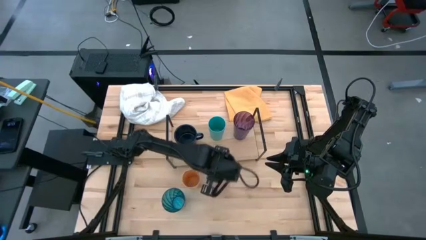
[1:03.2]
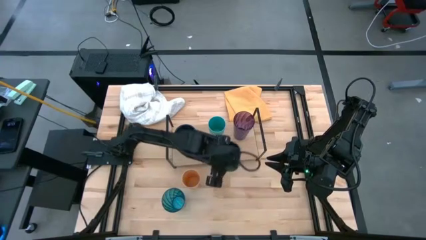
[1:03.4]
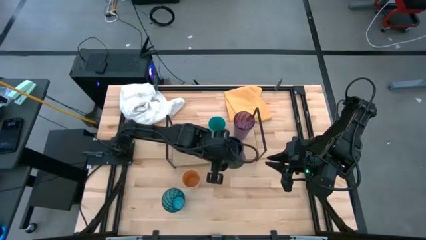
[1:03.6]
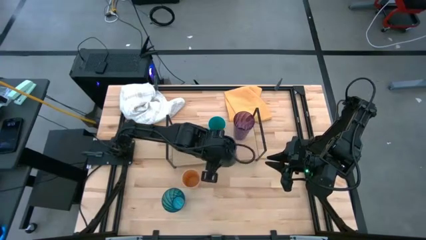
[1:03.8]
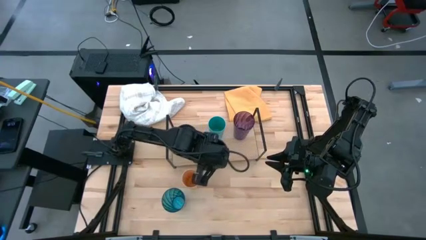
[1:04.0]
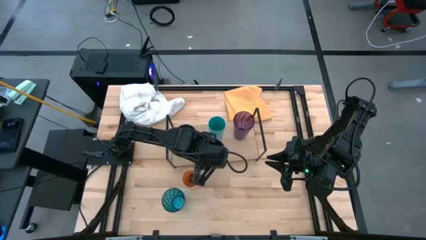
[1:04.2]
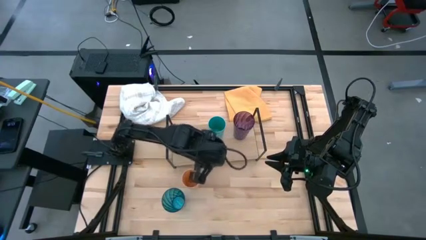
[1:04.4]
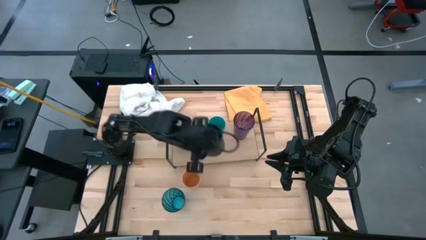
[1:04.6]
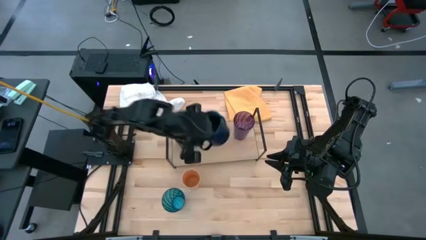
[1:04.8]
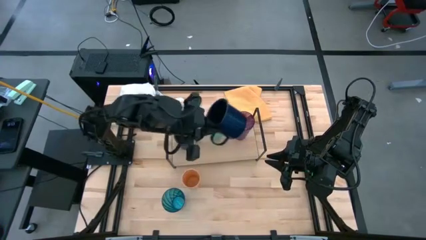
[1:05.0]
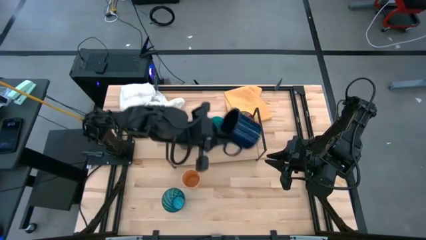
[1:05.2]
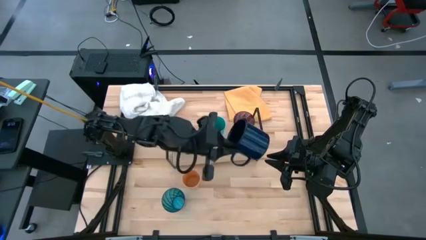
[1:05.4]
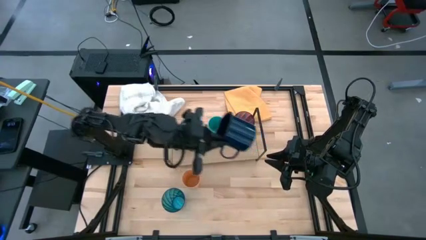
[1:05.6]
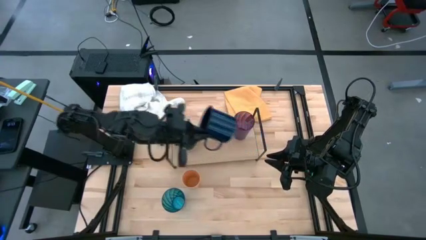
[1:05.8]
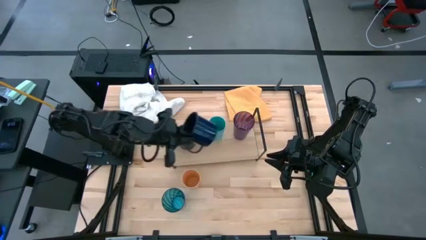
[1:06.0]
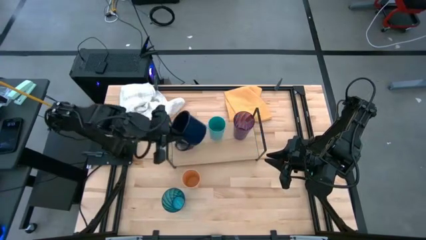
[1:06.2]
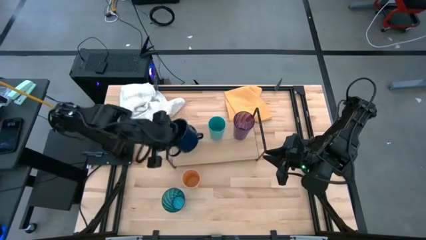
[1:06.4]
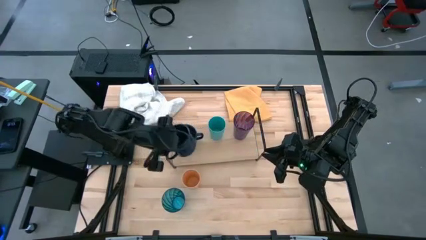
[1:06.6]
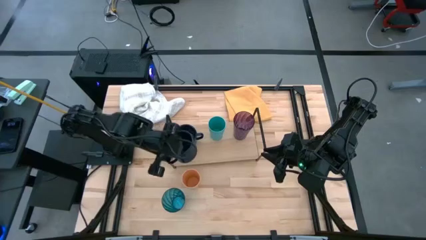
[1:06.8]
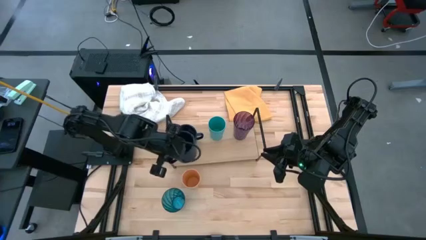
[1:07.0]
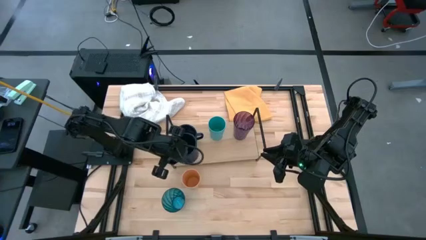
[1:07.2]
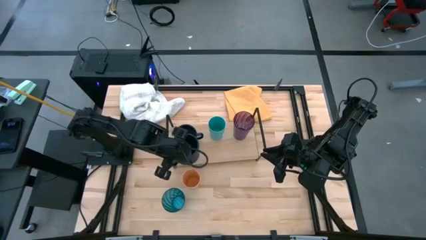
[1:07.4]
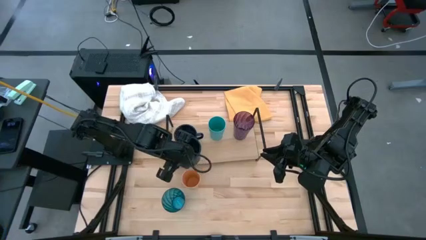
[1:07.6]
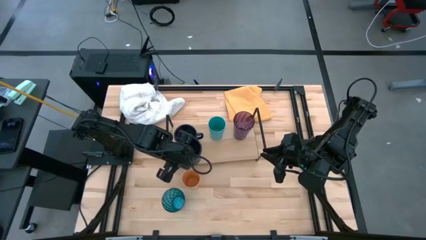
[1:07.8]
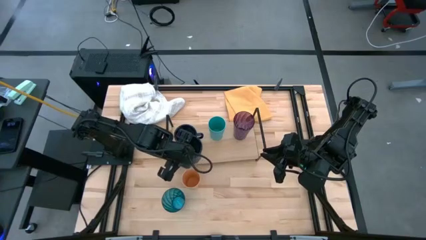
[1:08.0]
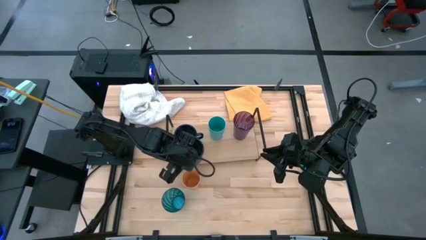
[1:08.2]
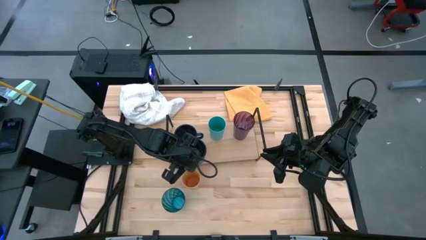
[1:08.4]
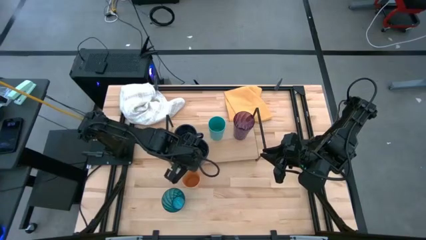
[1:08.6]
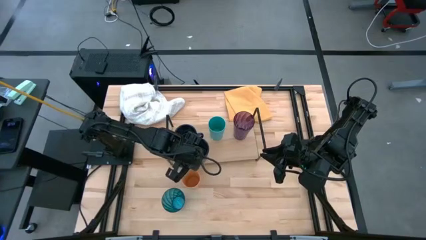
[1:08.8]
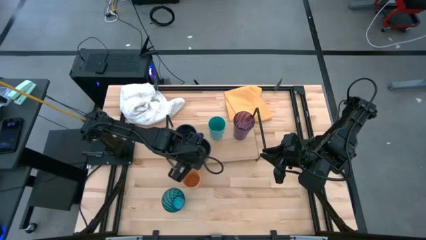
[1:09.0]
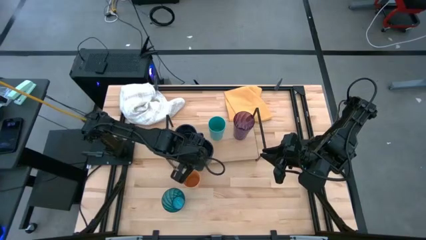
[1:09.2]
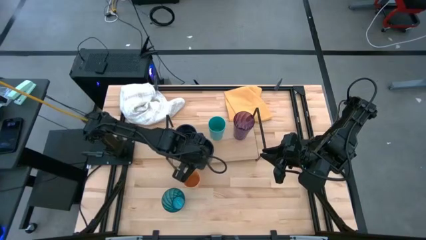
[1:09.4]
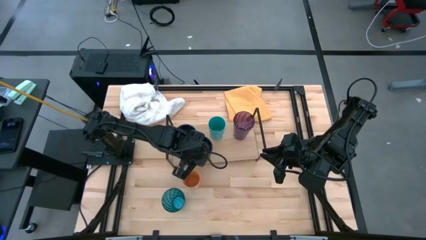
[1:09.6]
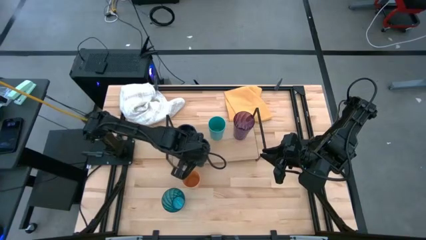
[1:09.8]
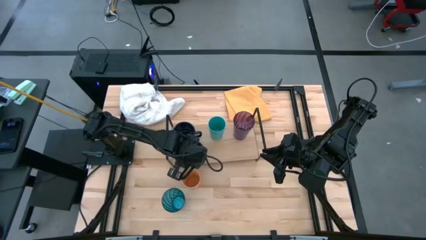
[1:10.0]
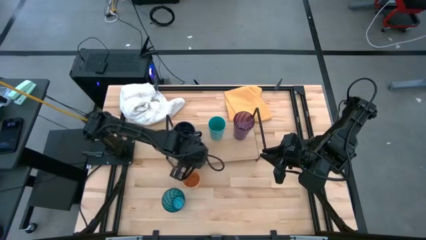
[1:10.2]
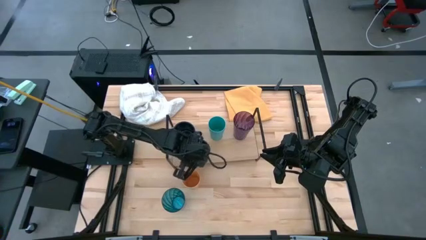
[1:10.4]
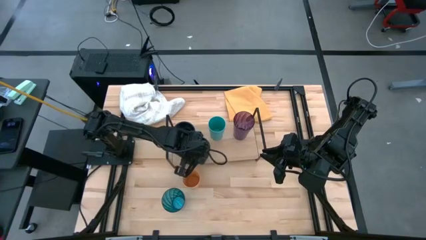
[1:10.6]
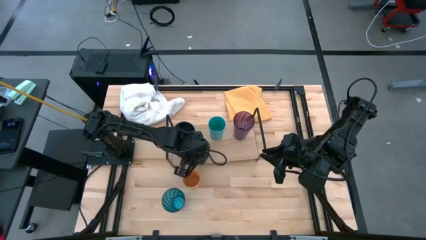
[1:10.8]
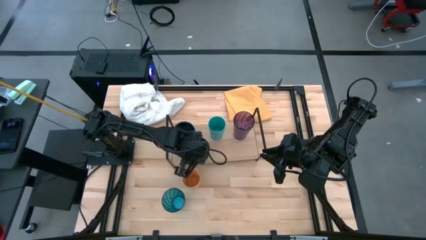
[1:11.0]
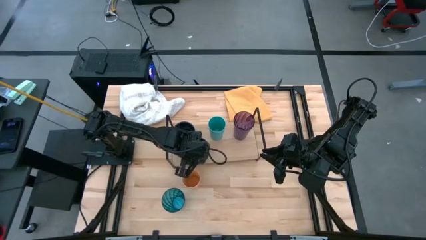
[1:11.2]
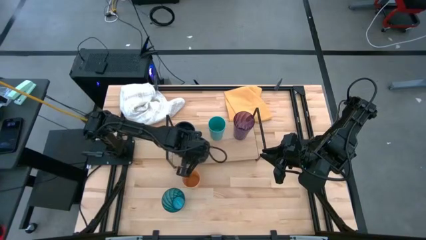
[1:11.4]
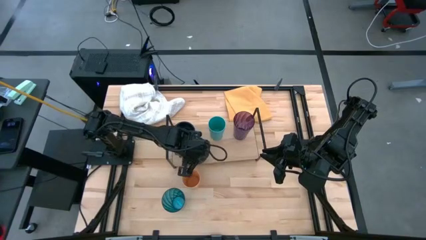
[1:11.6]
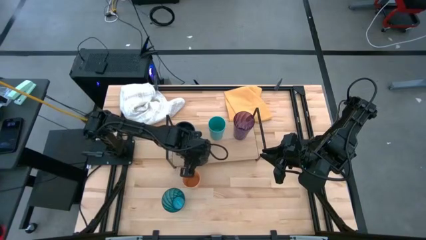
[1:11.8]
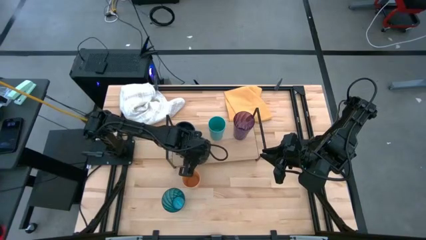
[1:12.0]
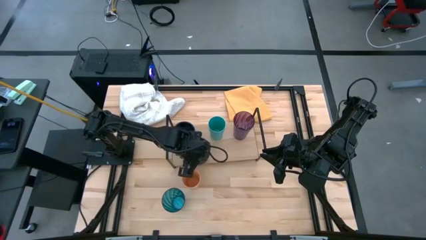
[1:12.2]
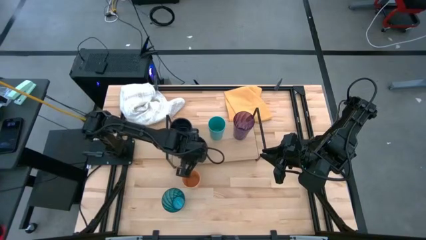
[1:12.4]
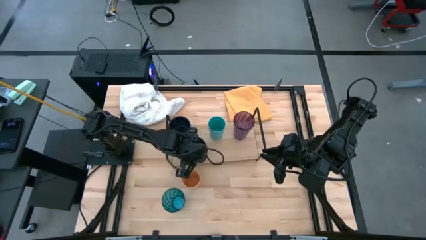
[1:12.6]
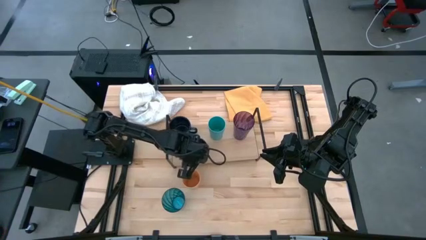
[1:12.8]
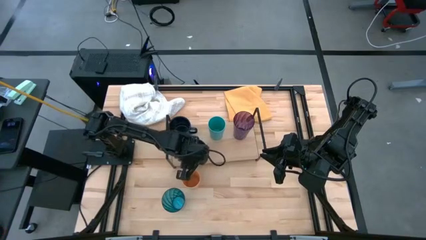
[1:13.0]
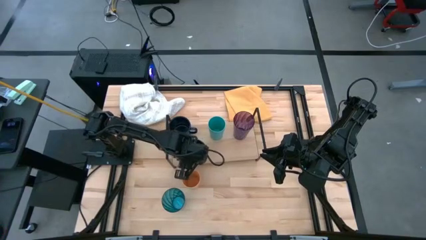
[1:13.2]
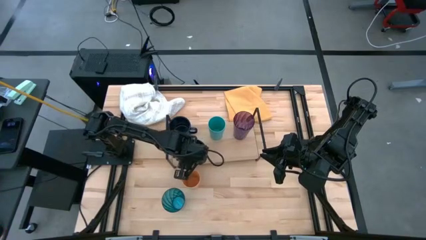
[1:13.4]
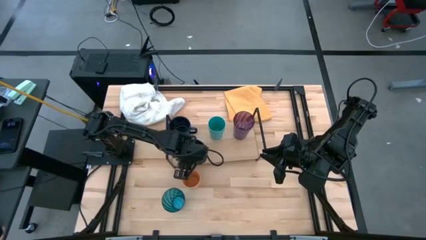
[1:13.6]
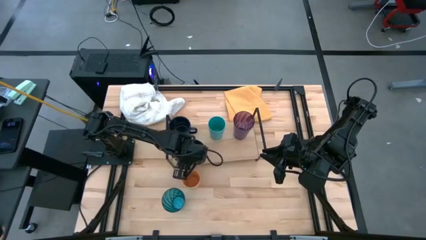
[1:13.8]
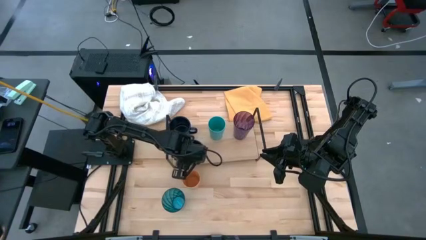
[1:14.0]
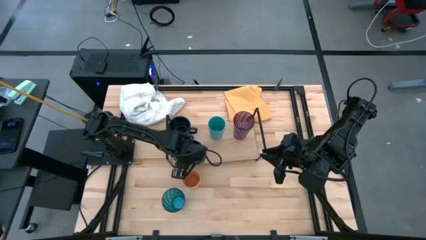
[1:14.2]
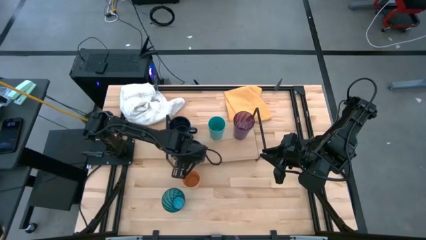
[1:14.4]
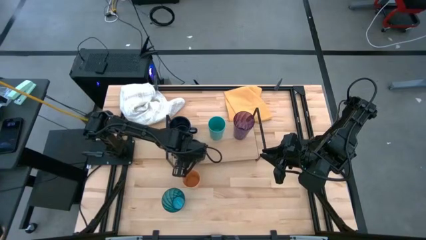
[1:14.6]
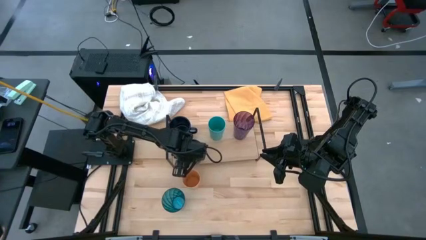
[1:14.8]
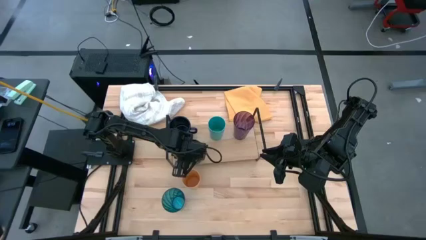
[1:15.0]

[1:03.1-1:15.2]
Task: Stack small to large cups/mugs on shelf
Put the dark blue mug on the shelf aligned with the other dark blue mug

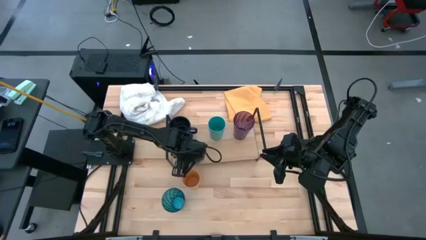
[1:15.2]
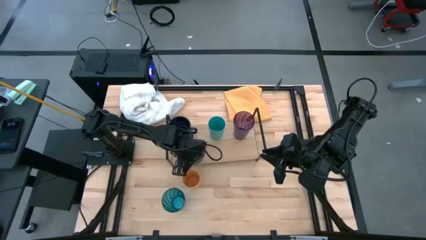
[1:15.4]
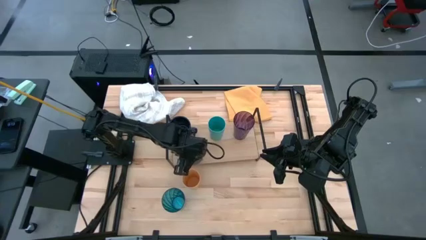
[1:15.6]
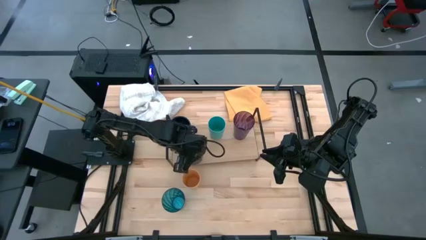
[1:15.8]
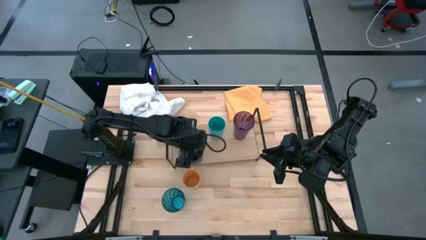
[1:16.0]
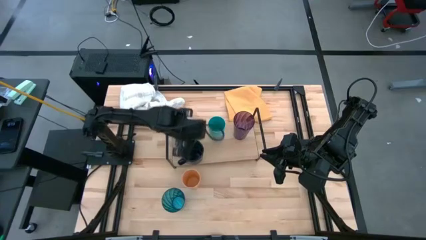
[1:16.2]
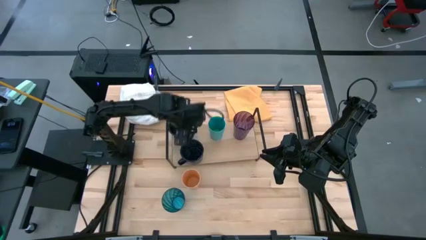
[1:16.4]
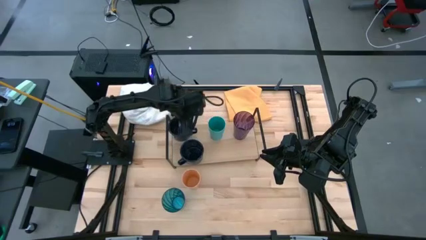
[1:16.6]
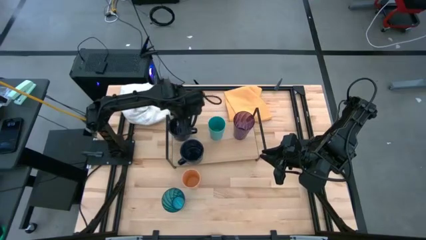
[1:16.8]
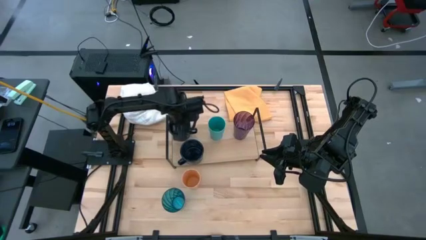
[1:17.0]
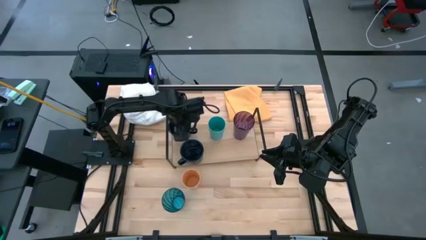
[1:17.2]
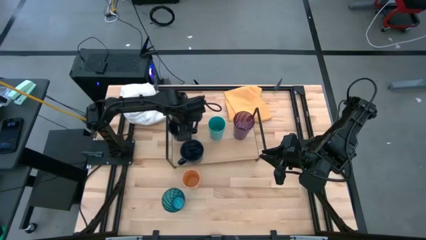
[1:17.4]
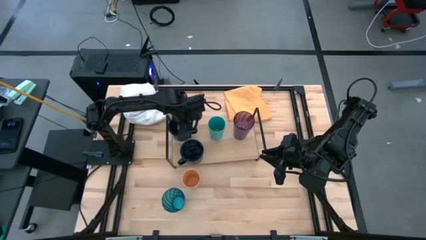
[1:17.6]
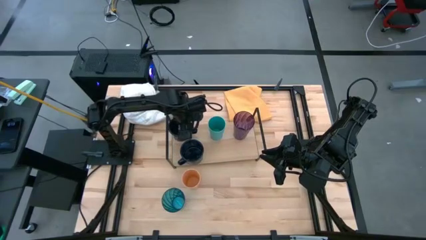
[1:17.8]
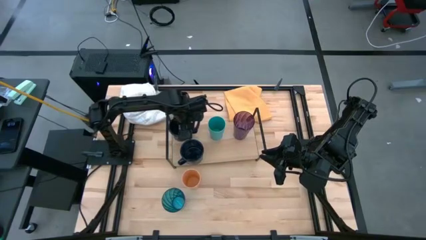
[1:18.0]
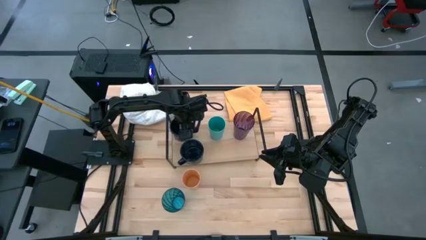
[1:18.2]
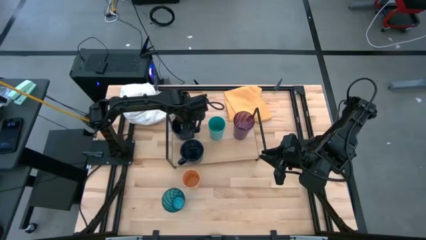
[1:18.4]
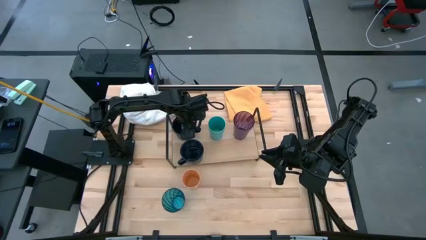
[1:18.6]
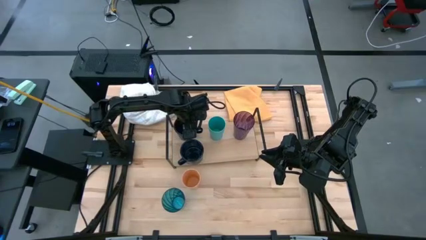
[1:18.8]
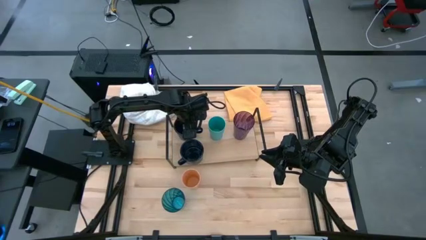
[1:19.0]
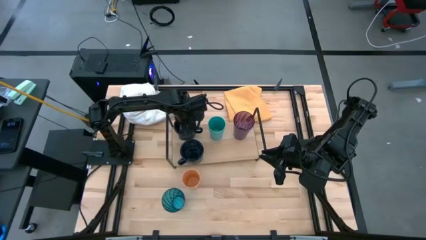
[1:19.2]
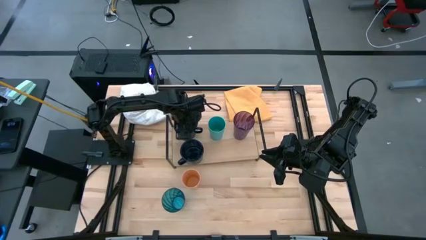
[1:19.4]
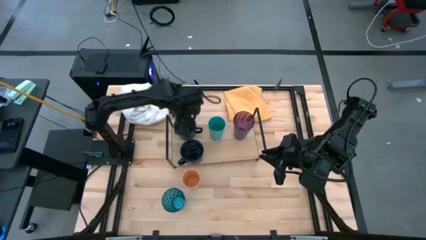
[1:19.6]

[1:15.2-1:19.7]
Adjust the back dark blue mug on the shelf
